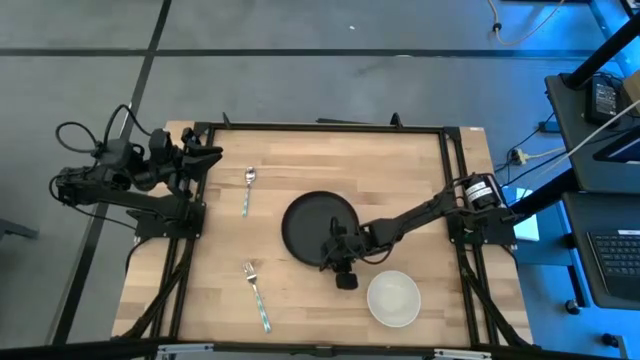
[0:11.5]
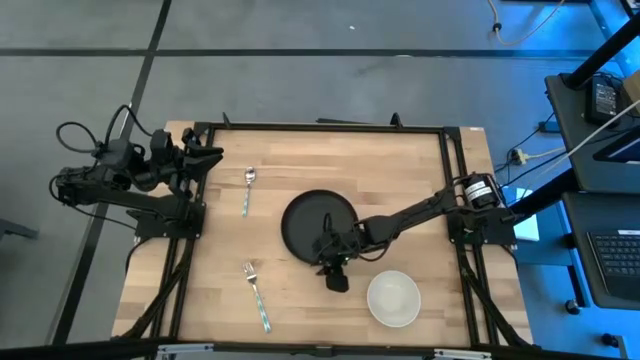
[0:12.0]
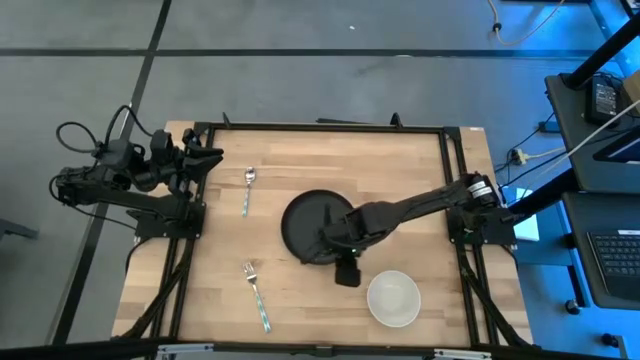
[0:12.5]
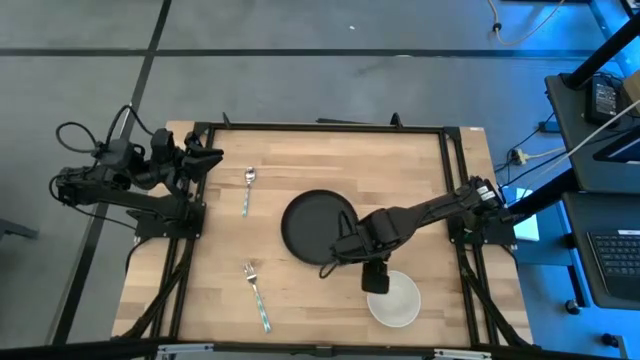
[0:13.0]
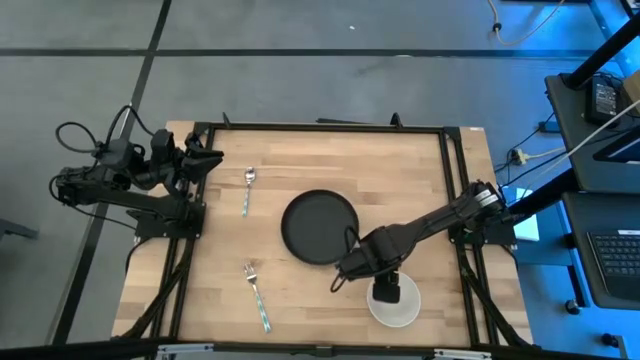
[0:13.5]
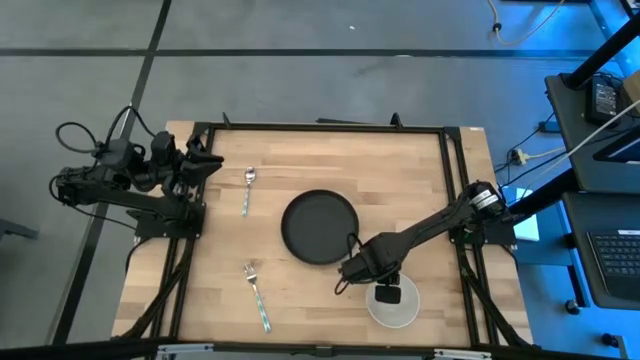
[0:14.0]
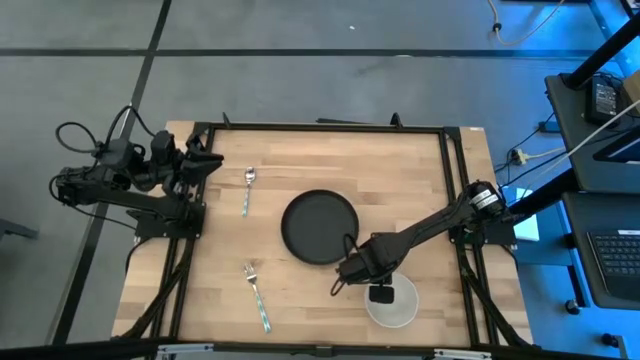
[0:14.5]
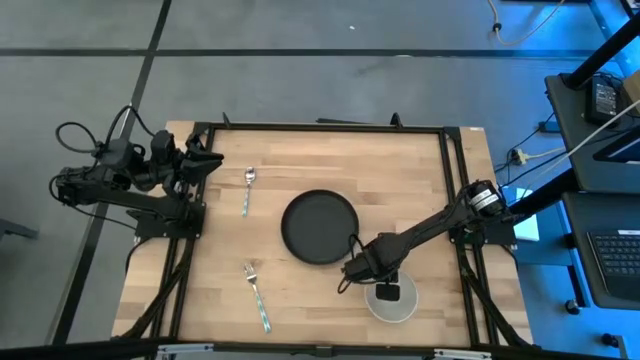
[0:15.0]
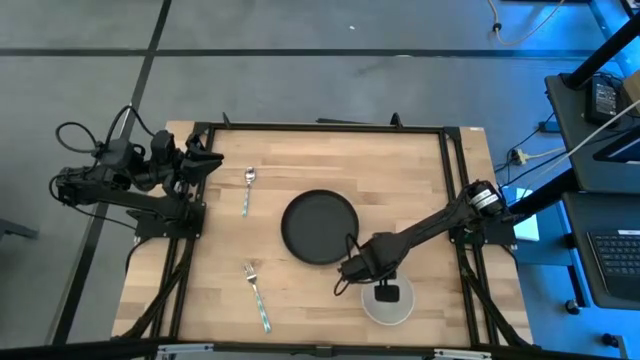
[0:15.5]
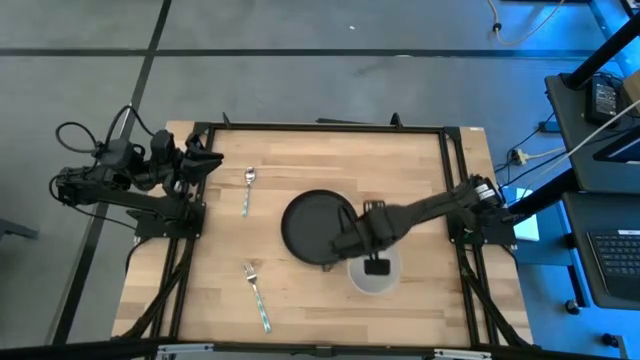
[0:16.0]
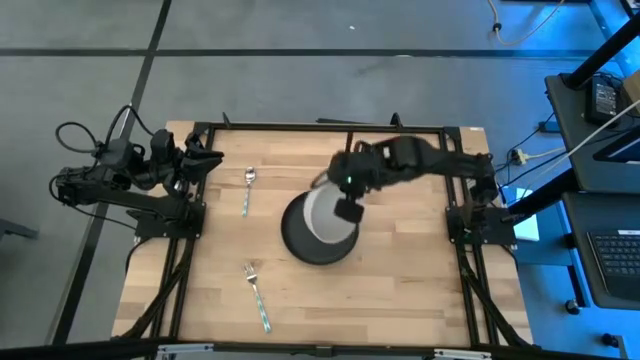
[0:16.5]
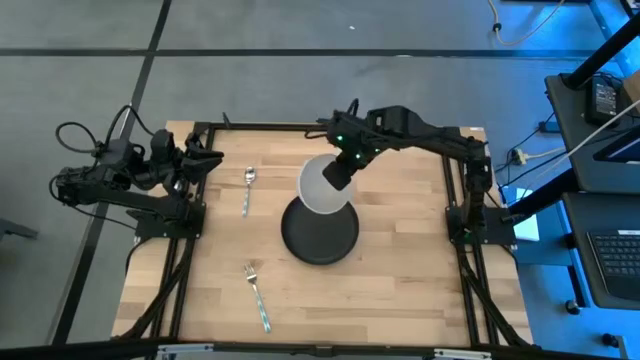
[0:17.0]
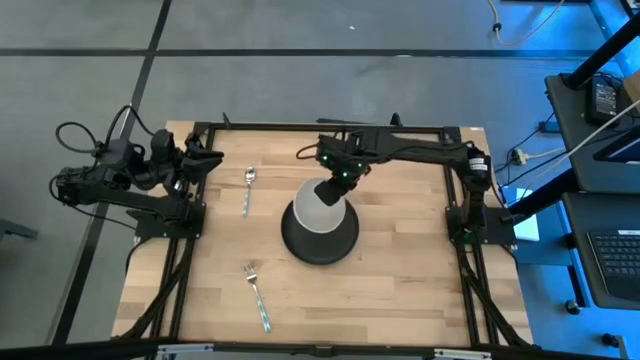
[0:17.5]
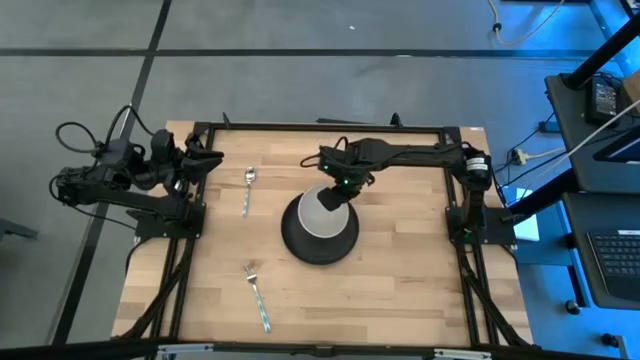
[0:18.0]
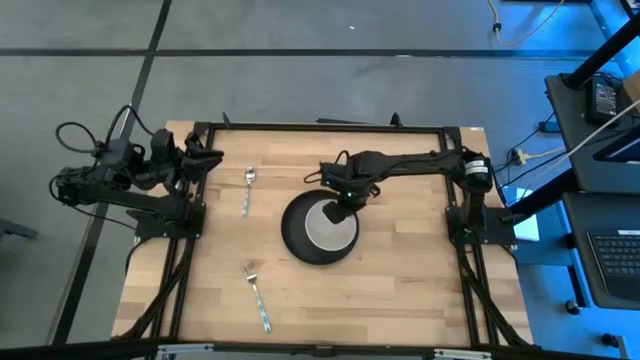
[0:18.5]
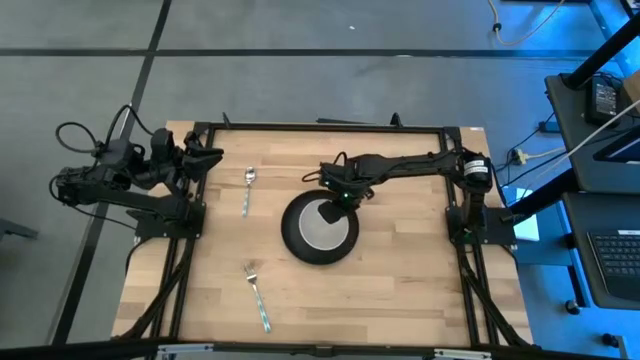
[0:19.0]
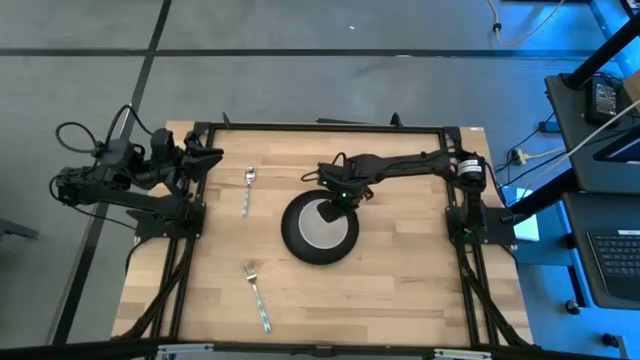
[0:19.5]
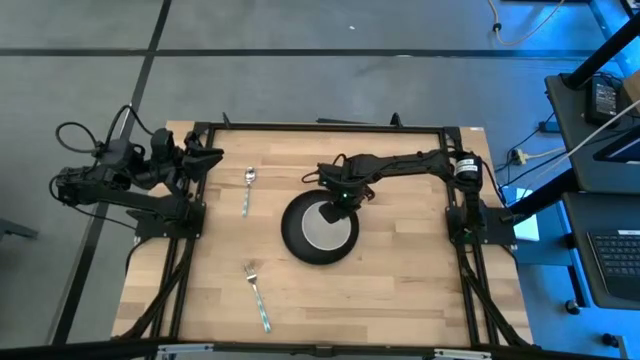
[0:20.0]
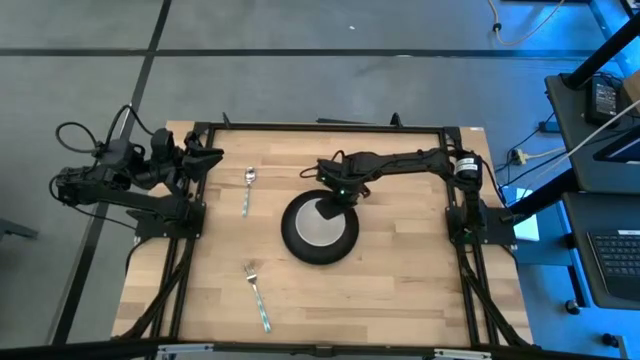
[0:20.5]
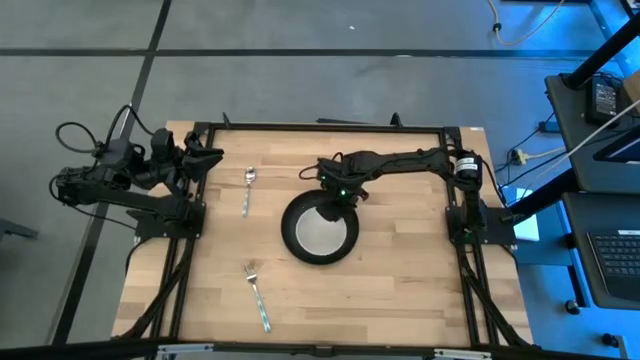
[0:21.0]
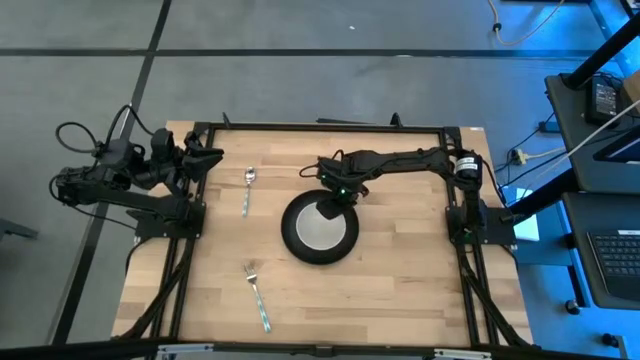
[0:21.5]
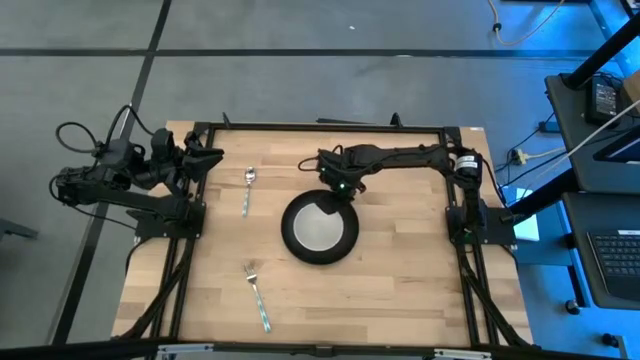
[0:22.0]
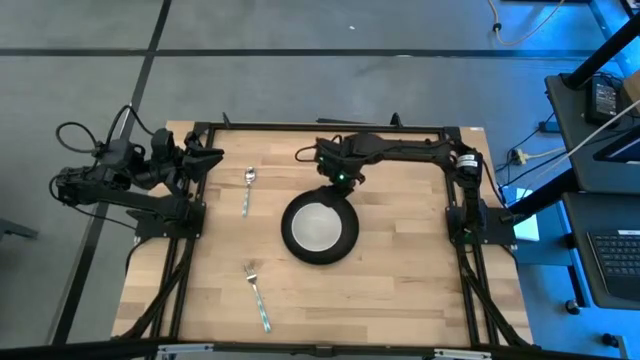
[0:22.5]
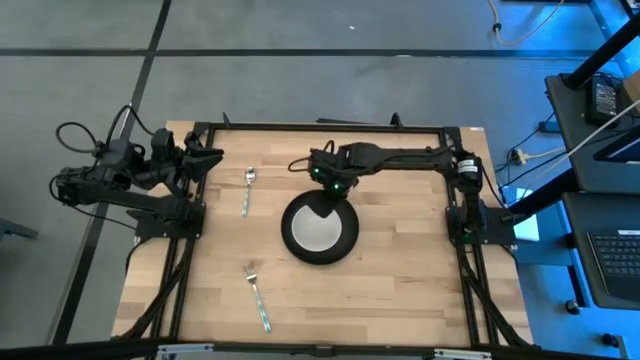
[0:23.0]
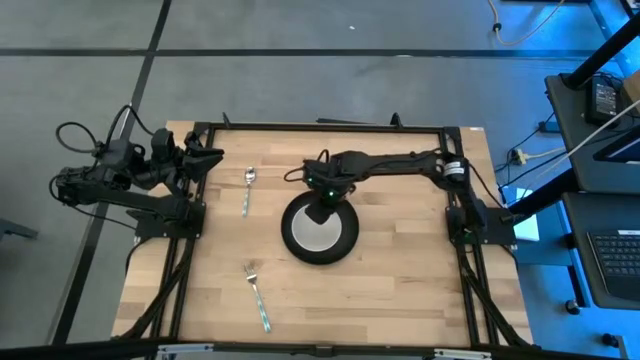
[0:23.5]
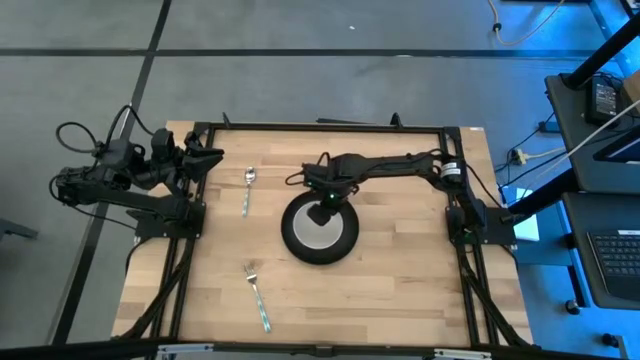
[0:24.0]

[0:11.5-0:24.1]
Task: Set table place
Put the bowl on the plate

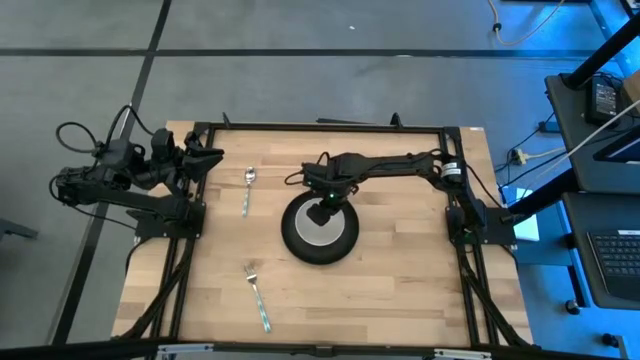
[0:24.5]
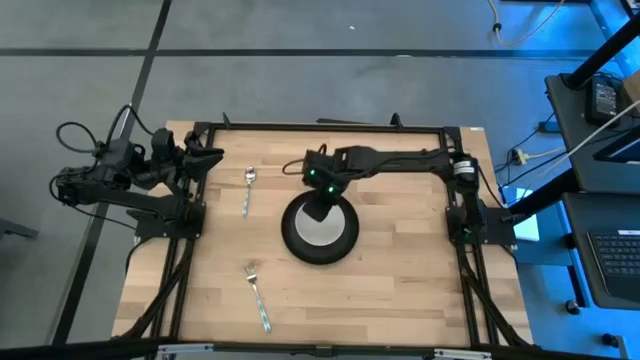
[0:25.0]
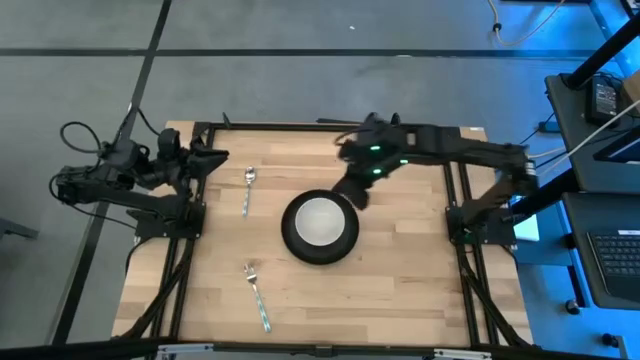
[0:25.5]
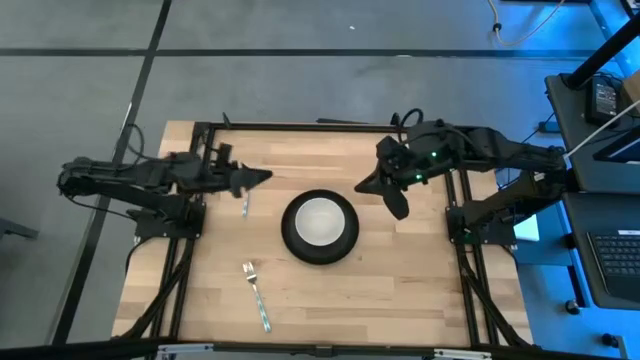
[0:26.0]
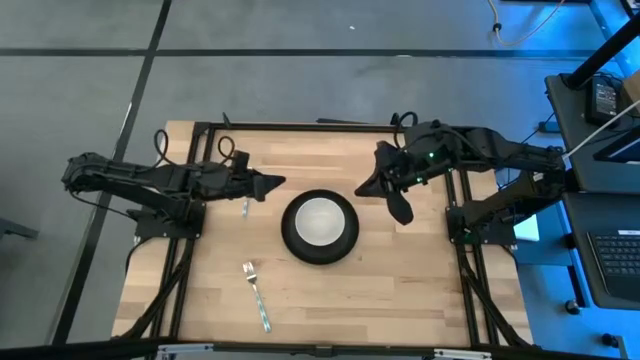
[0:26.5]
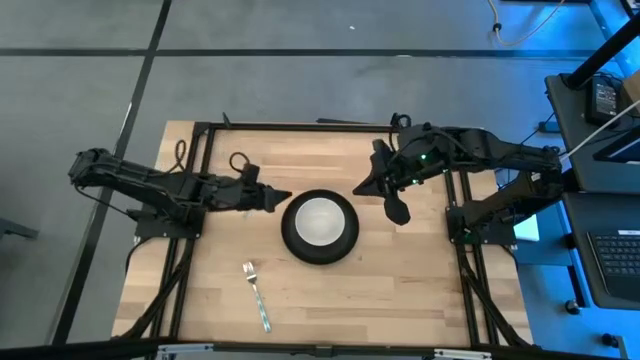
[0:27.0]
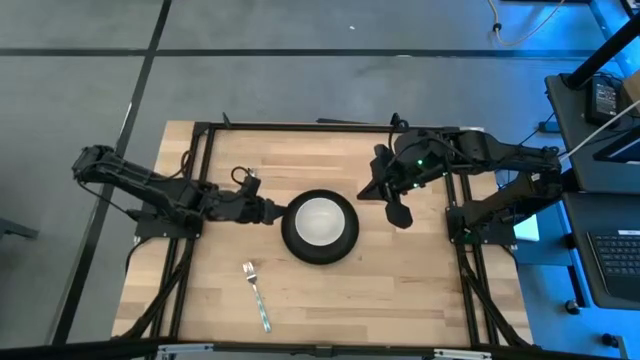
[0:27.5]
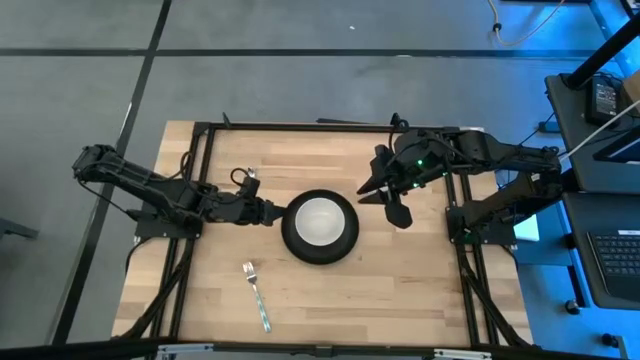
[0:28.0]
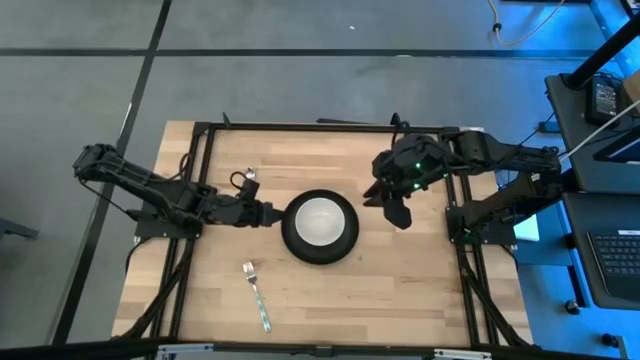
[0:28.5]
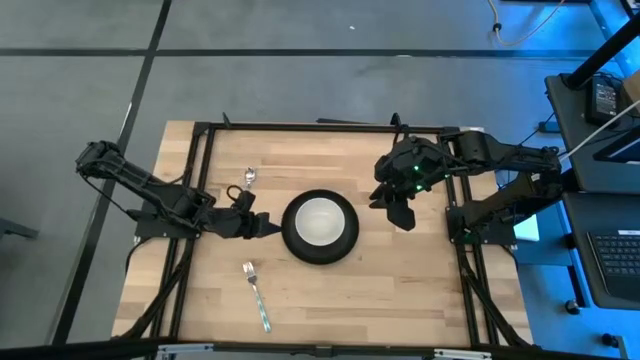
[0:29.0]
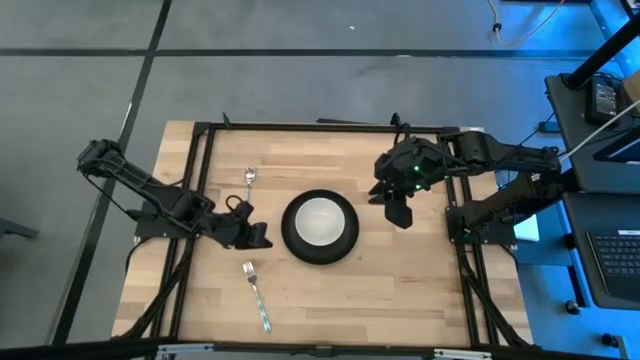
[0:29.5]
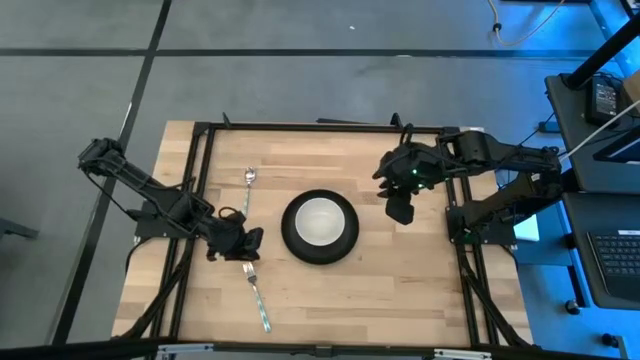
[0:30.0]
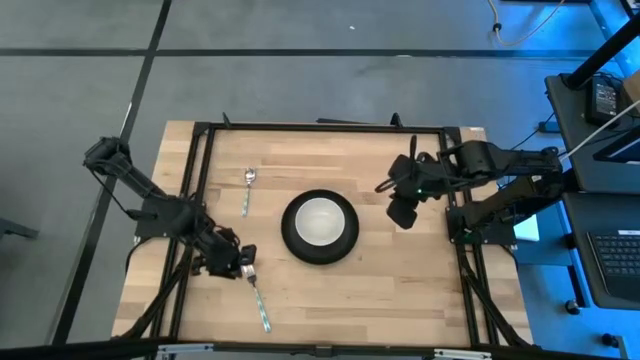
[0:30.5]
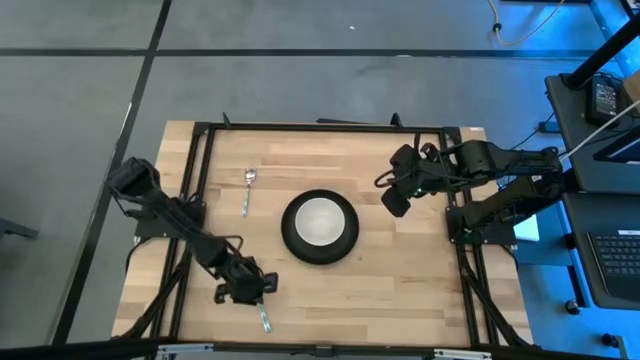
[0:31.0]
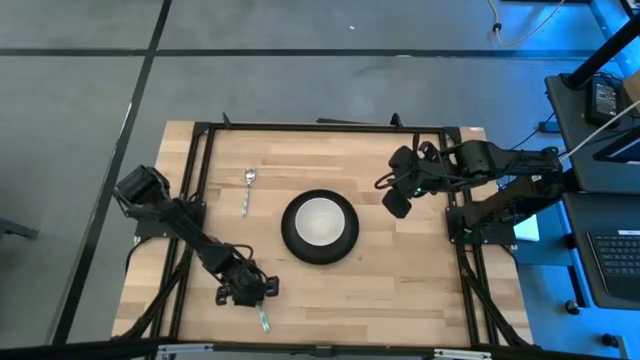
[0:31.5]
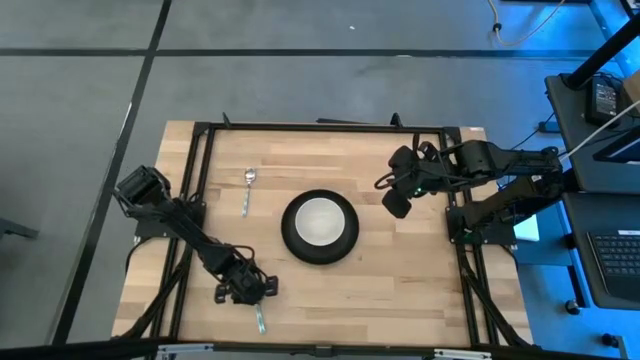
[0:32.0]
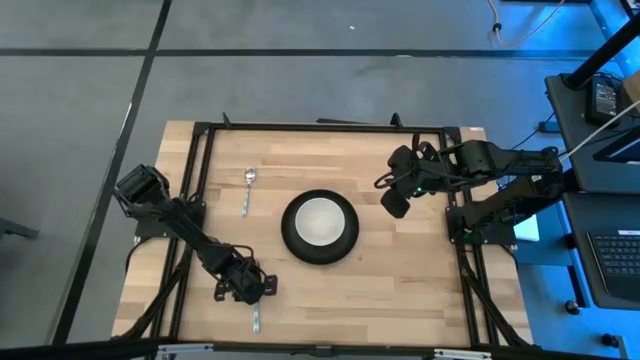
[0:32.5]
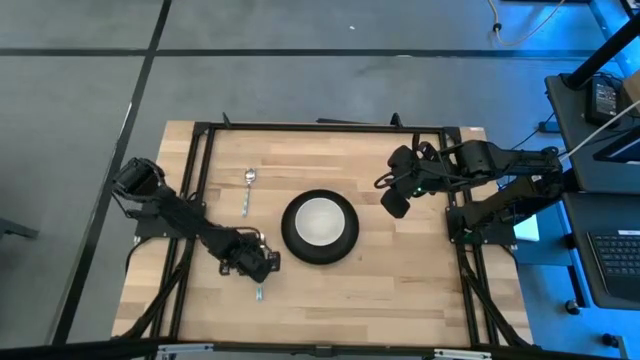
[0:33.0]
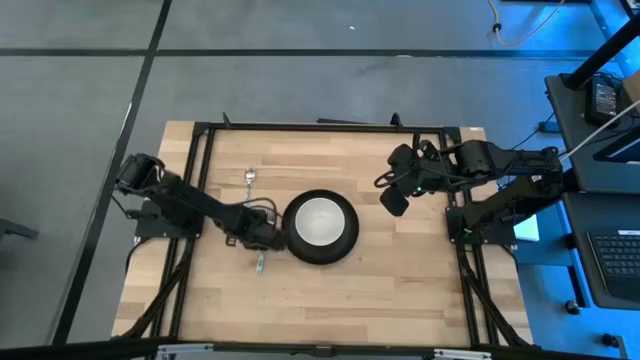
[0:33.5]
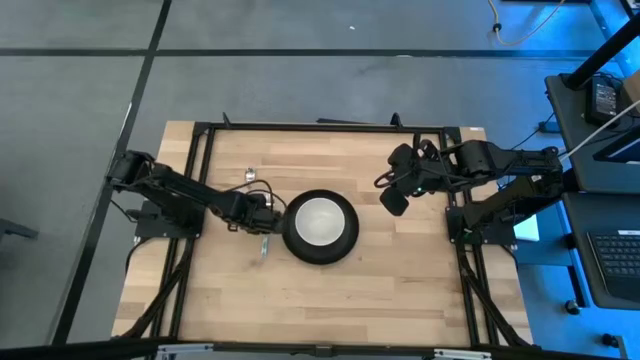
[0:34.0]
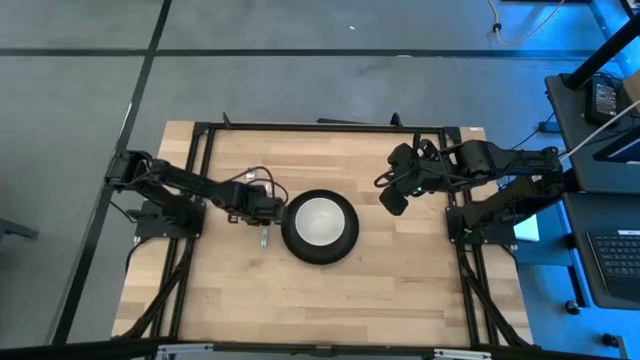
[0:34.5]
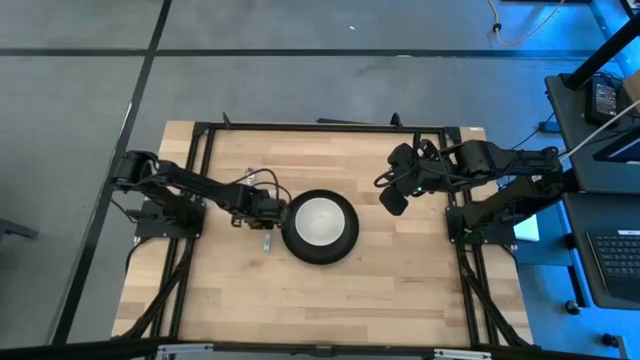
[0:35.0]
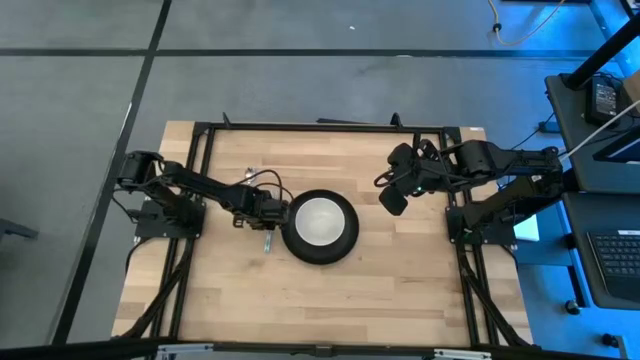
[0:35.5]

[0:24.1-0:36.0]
Put the fork to the left side of the plate
